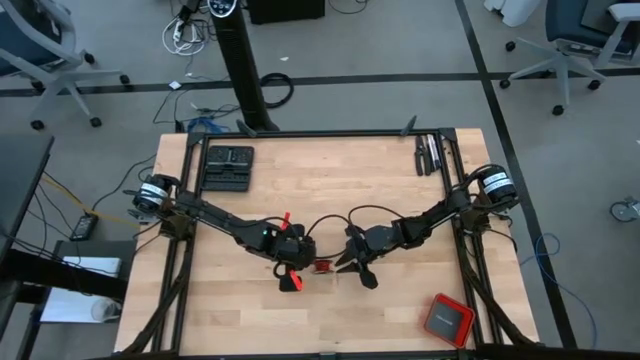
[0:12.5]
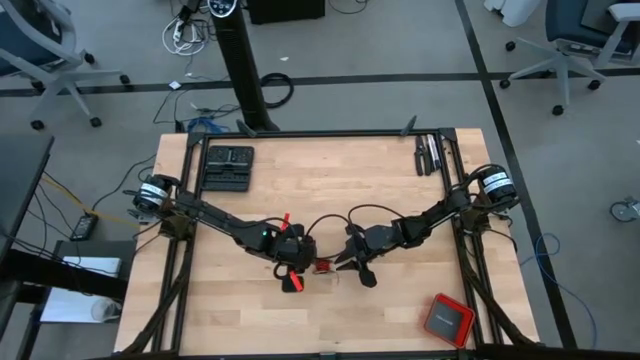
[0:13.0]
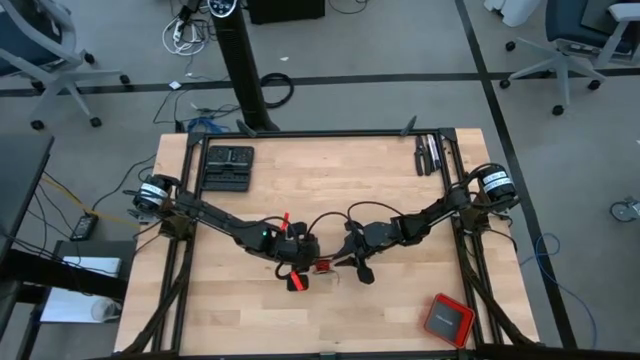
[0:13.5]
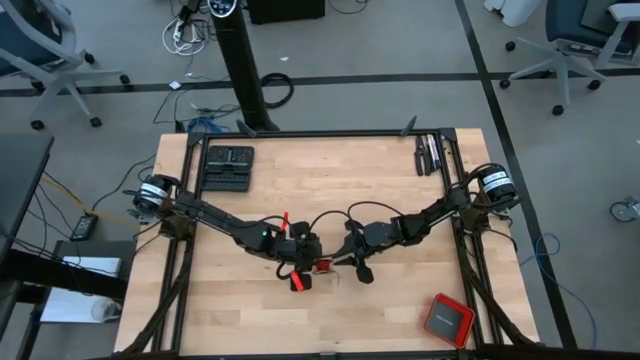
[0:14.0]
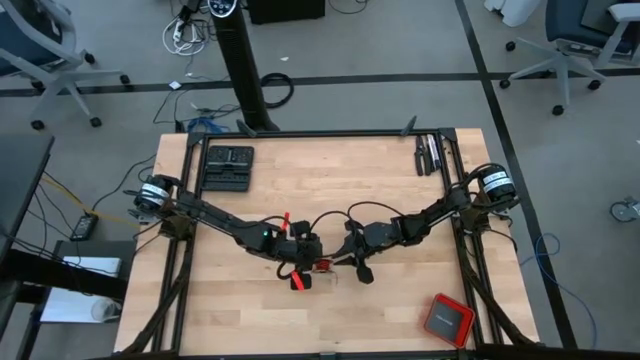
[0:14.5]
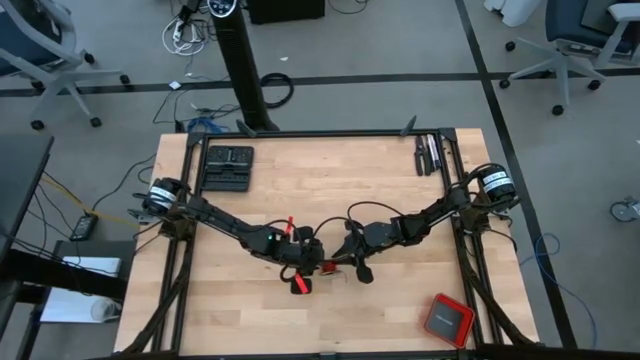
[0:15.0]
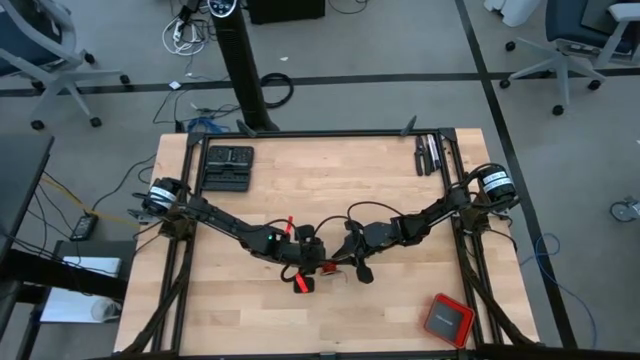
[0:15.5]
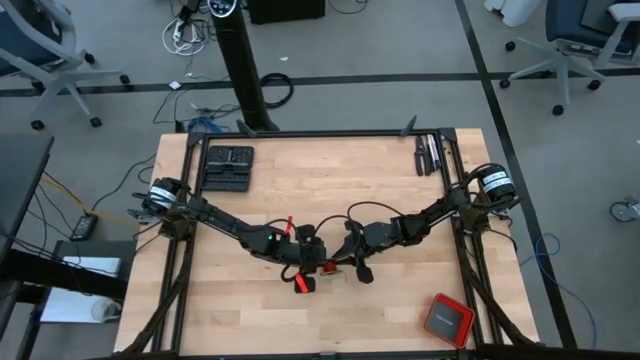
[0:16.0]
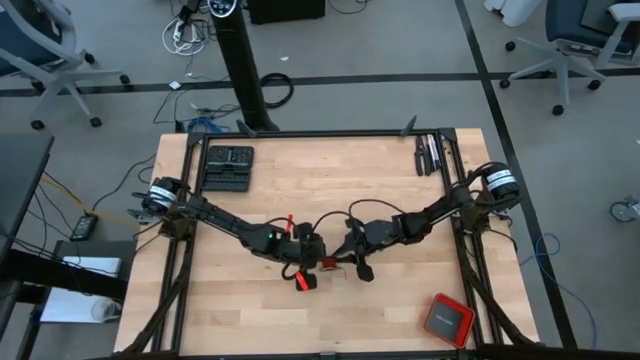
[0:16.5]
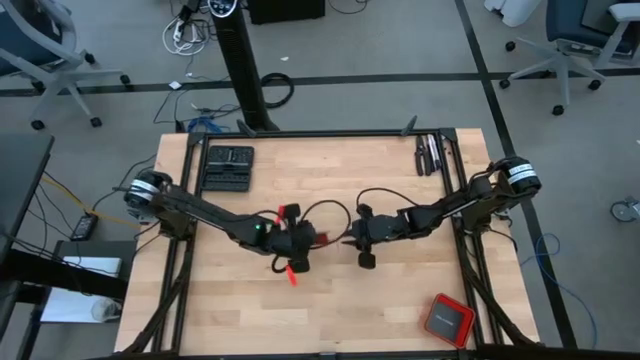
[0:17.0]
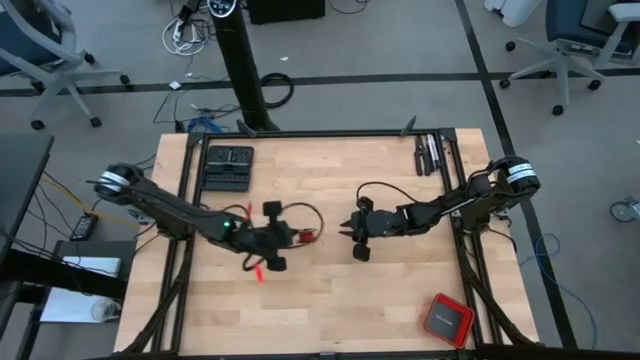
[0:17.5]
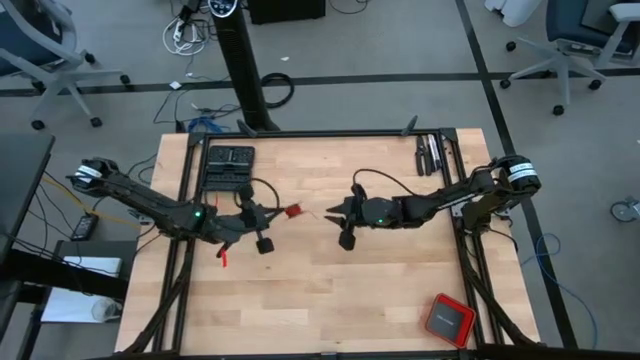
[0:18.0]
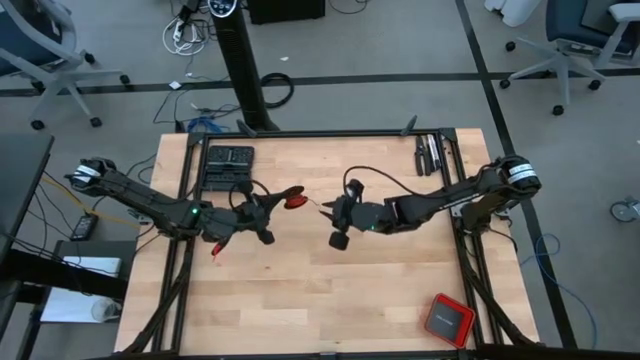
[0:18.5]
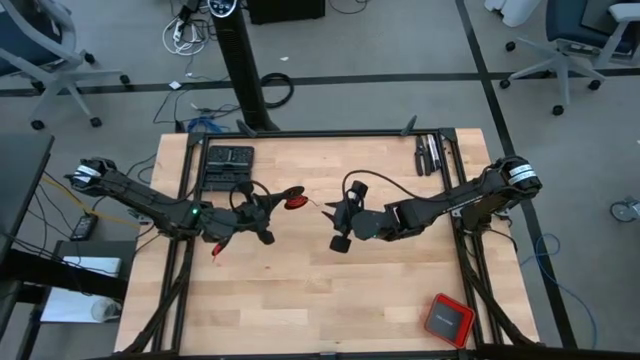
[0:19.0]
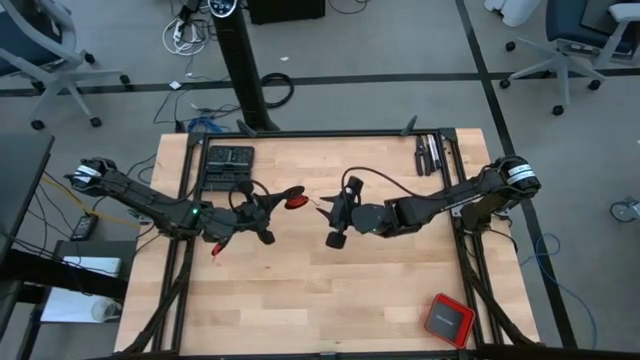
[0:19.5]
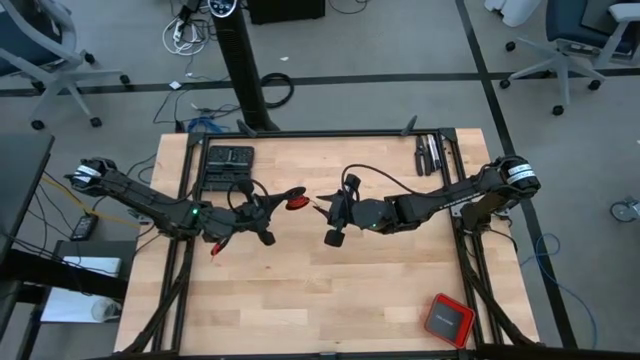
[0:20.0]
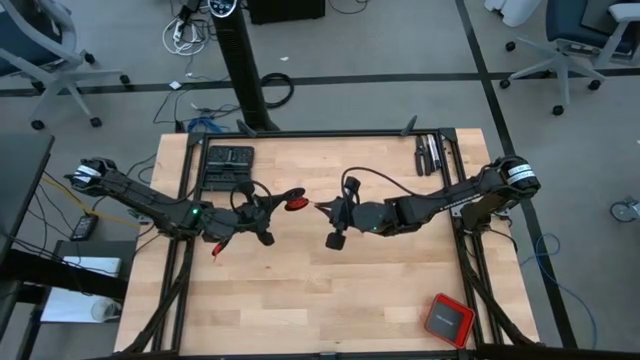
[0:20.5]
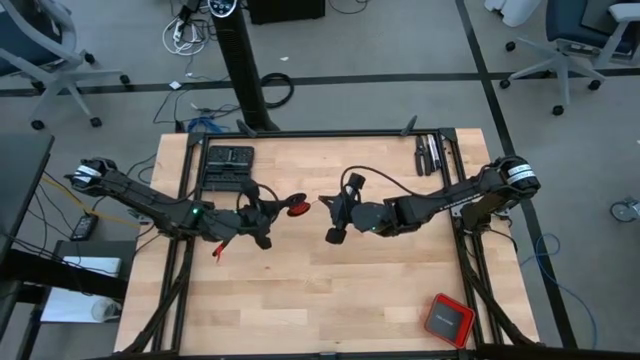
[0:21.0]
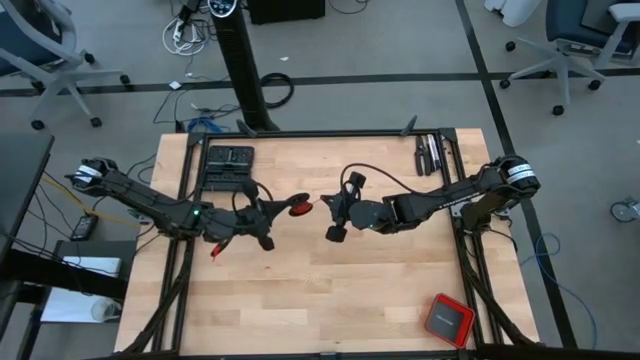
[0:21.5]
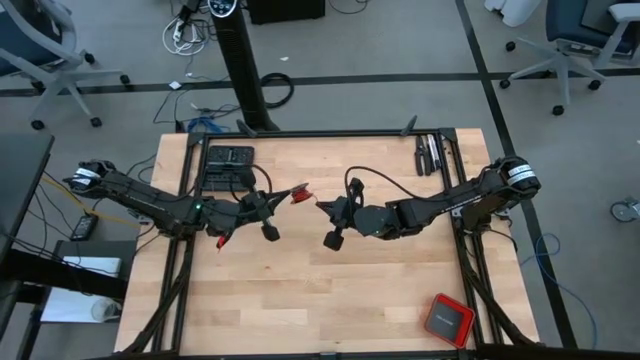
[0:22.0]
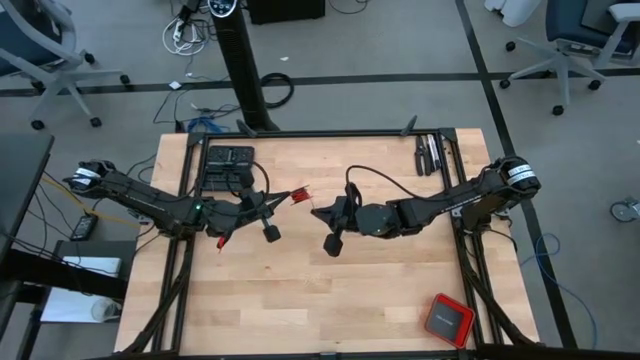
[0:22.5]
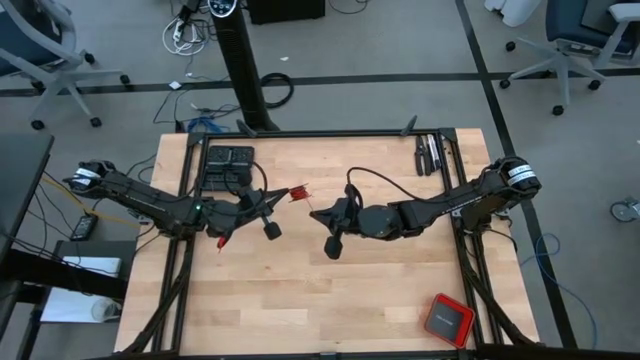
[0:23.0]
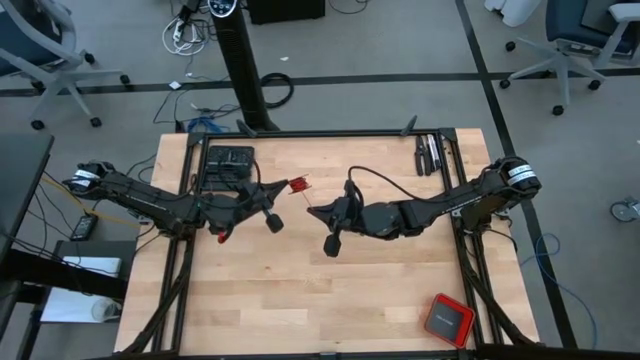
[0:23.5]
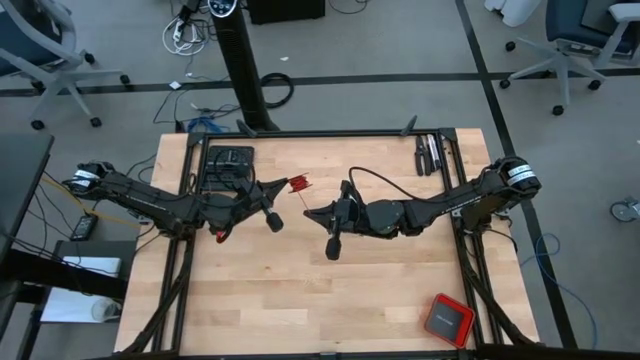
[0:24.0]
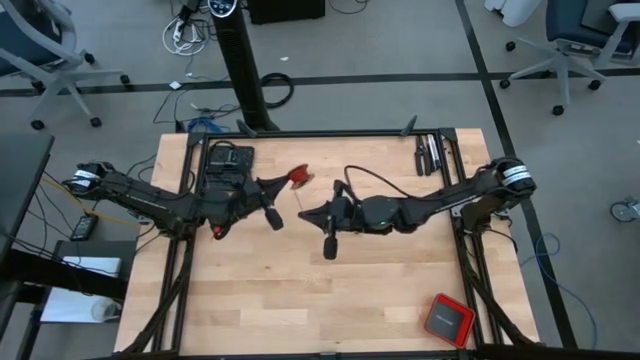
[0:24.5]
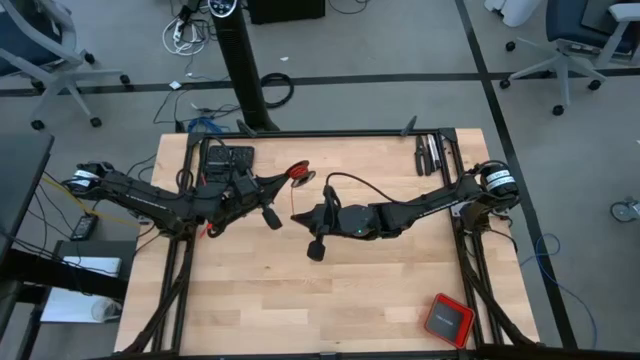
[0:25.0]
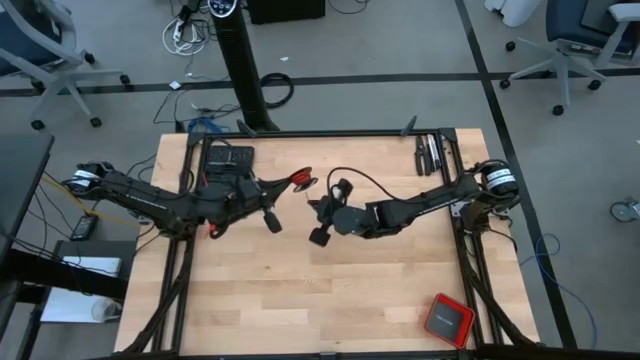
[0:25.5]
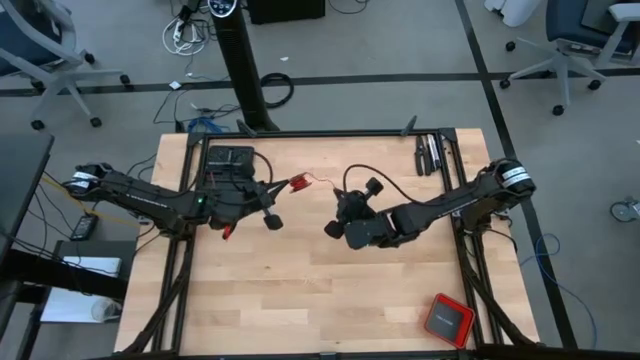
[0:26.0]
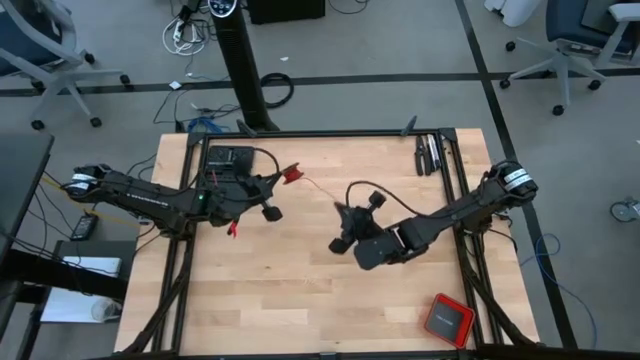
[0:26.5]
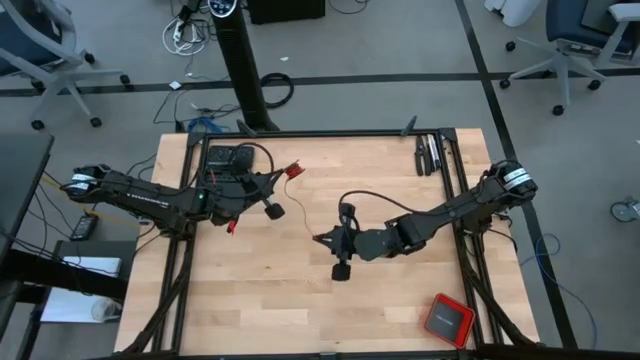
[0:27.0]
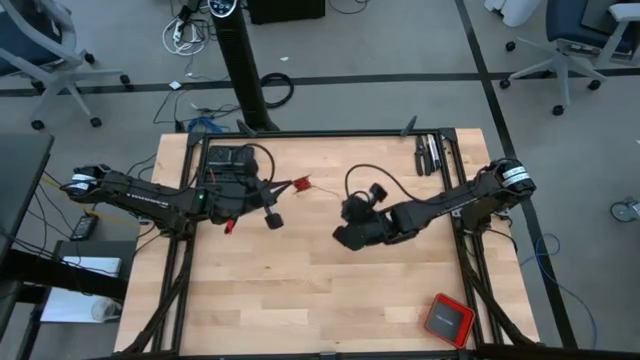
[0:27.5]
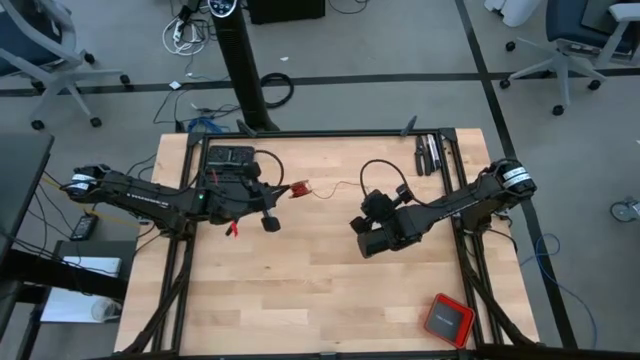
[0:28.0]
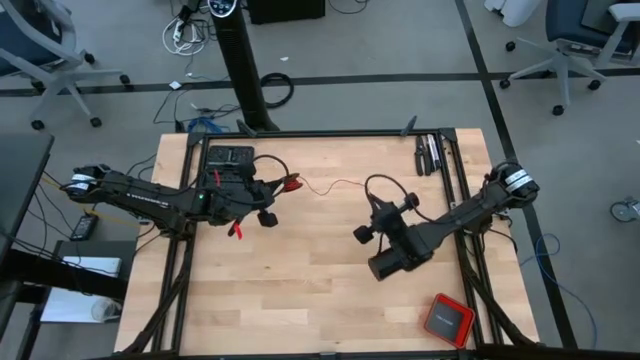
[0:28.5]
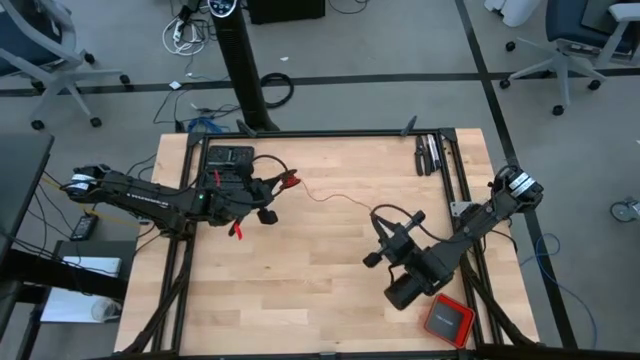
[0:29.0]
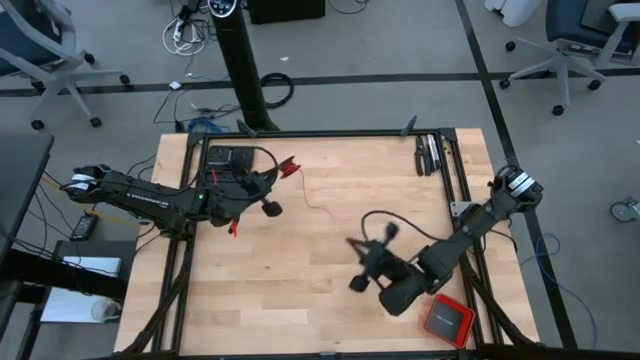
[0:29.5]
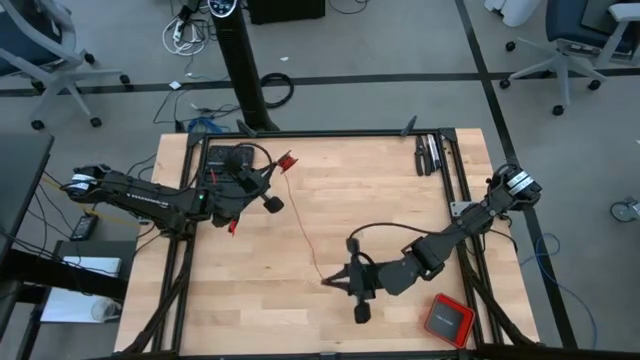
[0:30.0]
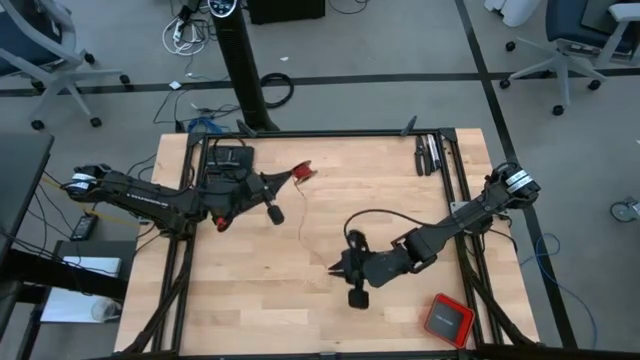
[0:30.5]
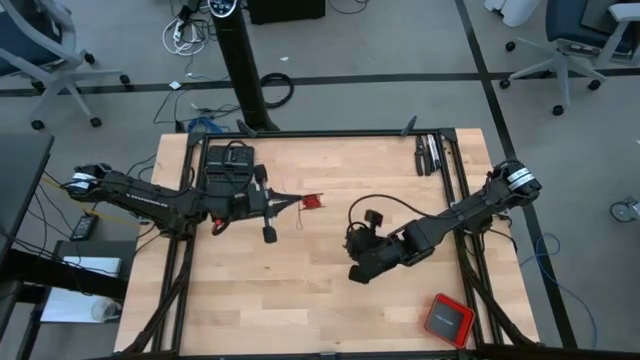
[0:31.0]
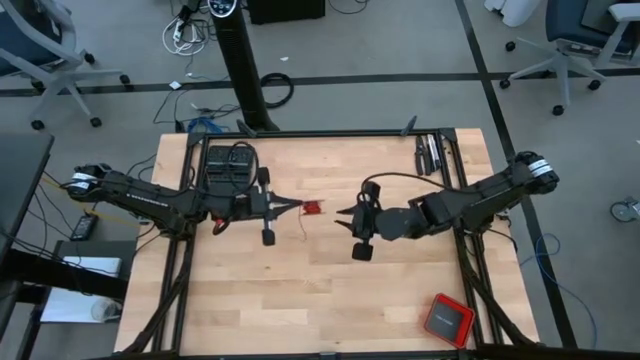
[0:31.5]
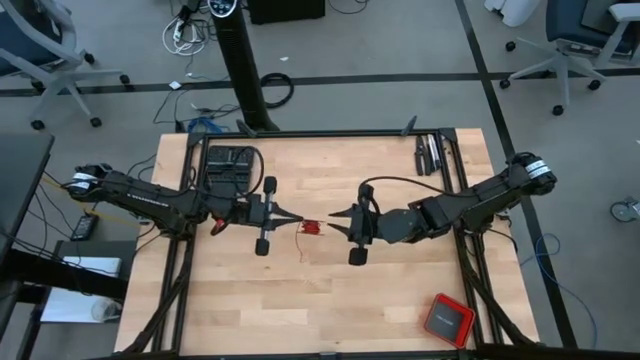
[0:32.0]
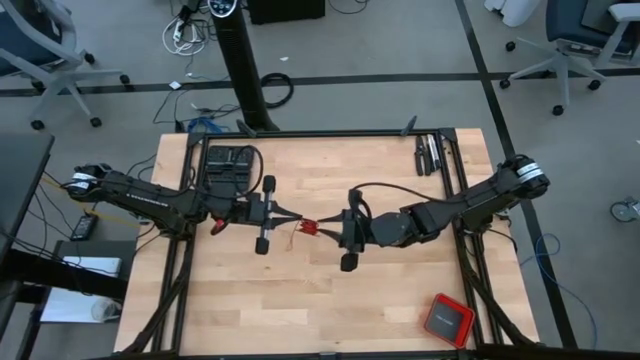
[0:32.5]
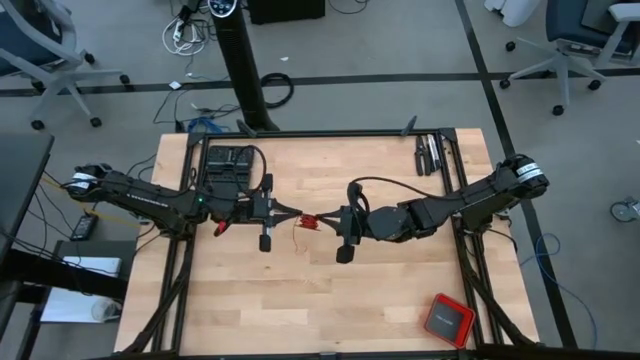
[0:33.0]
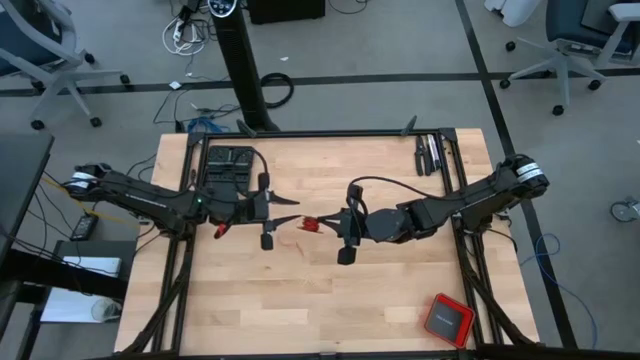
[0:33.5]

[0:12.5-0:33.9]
Task: Coil cords
Uncoil the red wire from the spool
